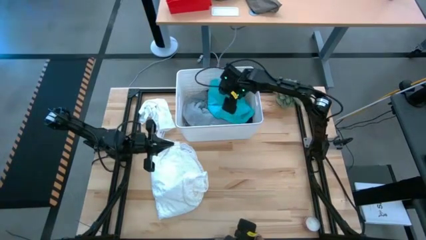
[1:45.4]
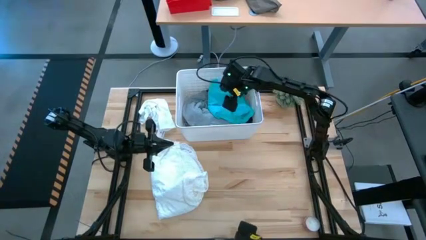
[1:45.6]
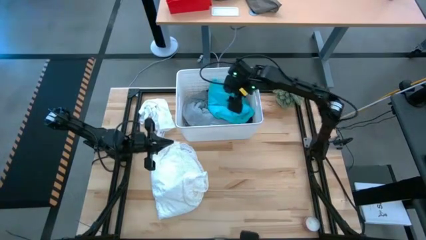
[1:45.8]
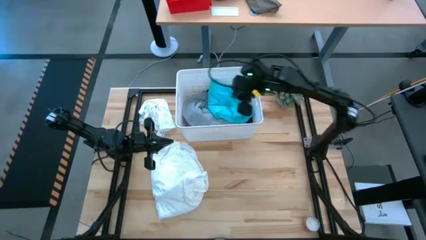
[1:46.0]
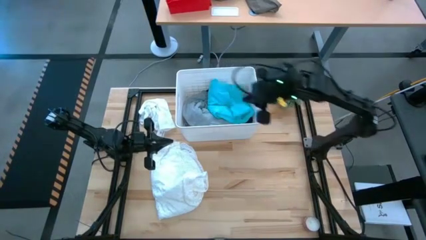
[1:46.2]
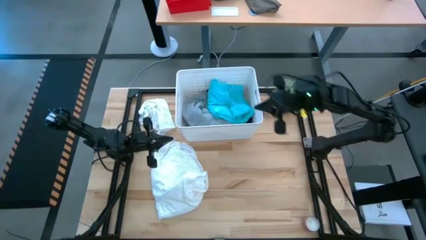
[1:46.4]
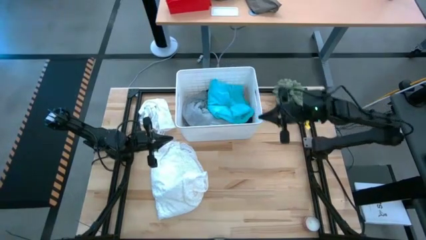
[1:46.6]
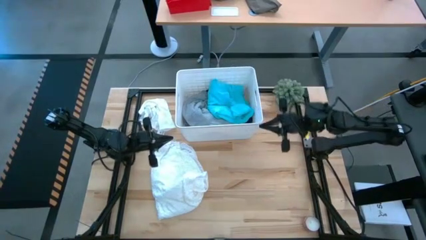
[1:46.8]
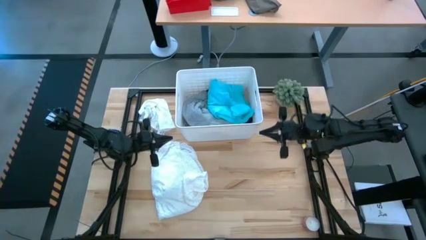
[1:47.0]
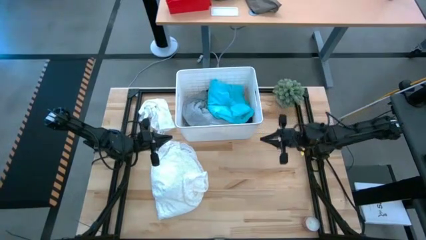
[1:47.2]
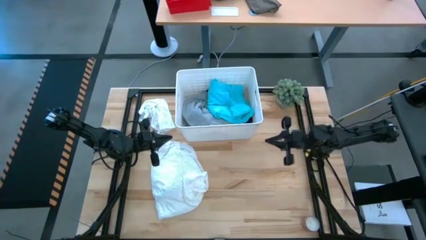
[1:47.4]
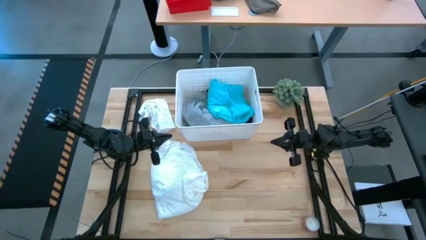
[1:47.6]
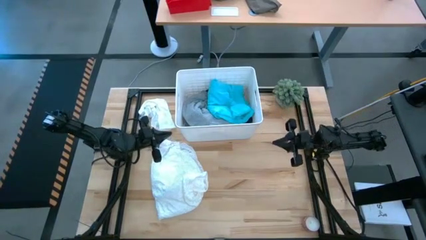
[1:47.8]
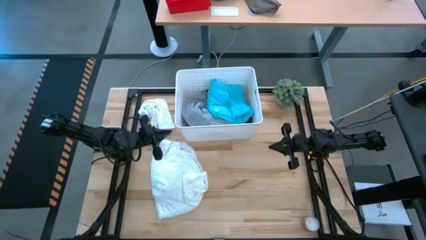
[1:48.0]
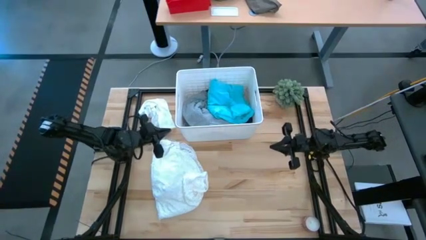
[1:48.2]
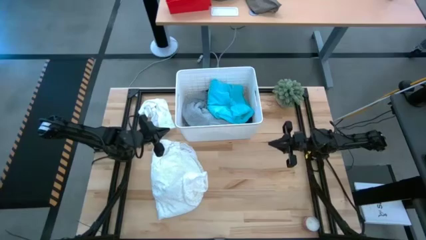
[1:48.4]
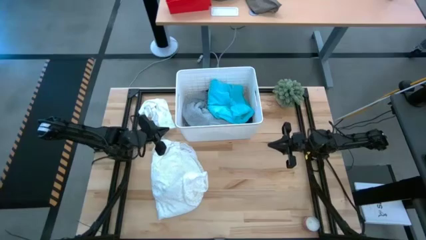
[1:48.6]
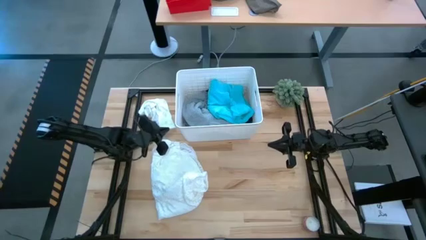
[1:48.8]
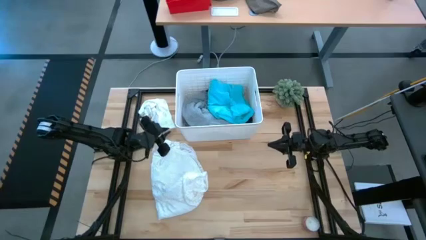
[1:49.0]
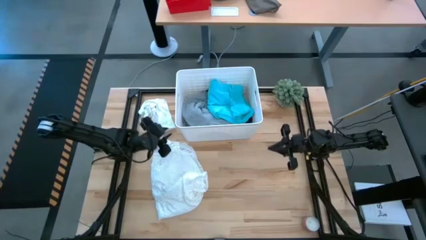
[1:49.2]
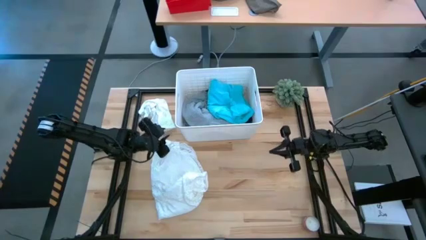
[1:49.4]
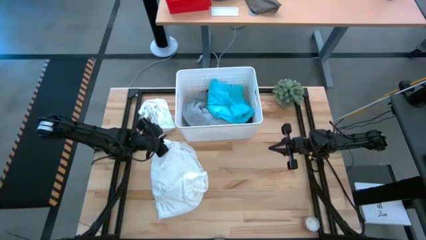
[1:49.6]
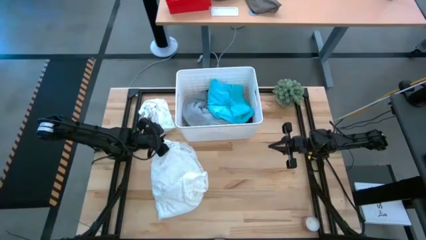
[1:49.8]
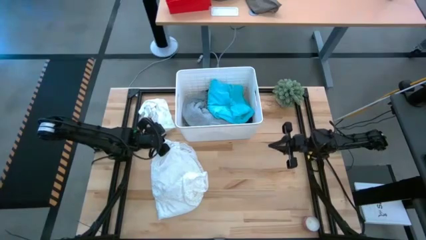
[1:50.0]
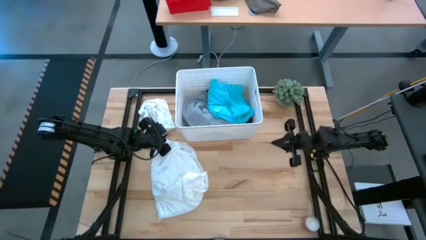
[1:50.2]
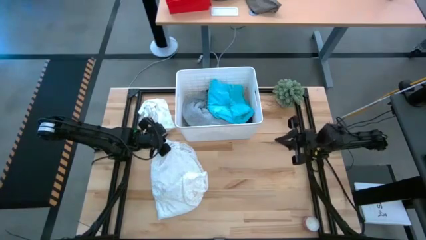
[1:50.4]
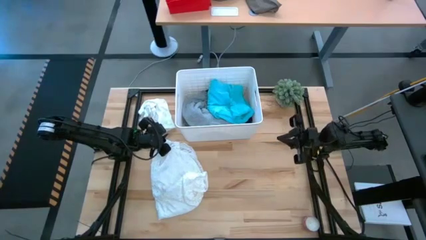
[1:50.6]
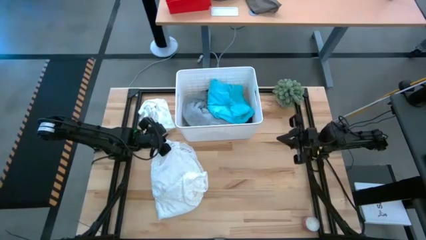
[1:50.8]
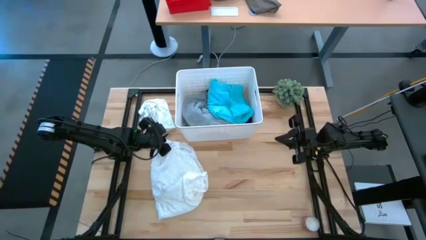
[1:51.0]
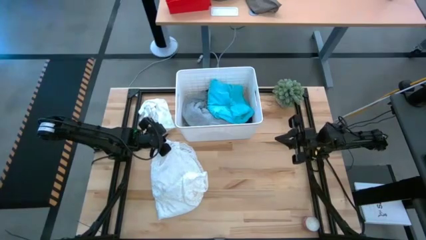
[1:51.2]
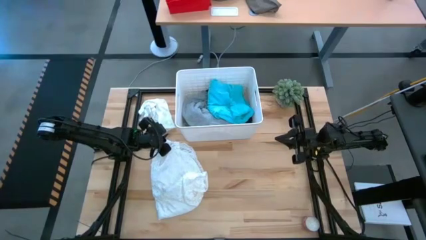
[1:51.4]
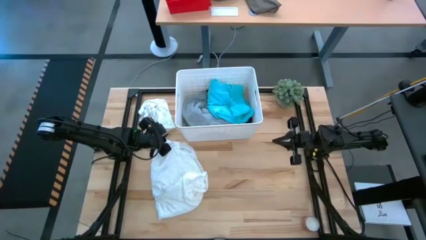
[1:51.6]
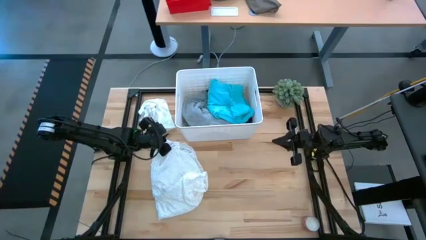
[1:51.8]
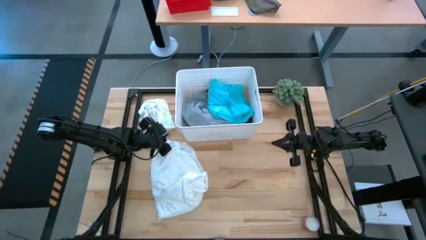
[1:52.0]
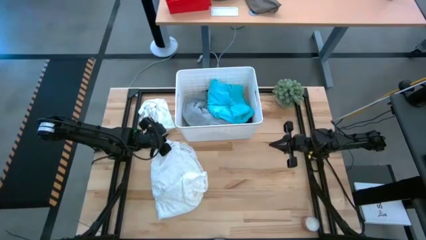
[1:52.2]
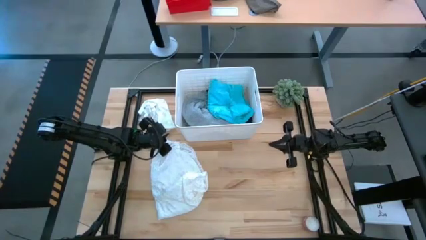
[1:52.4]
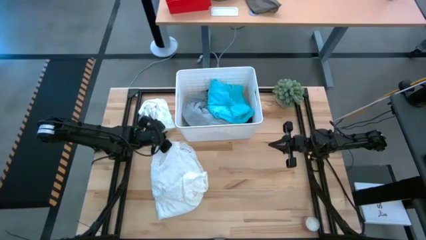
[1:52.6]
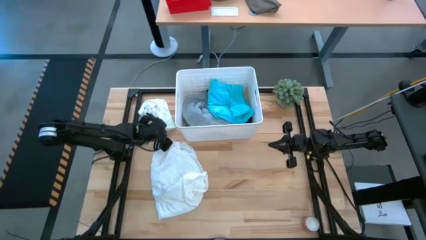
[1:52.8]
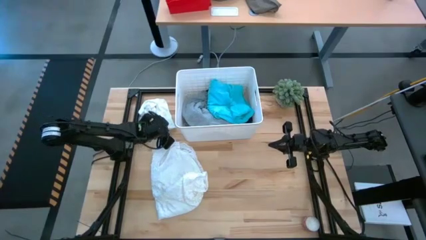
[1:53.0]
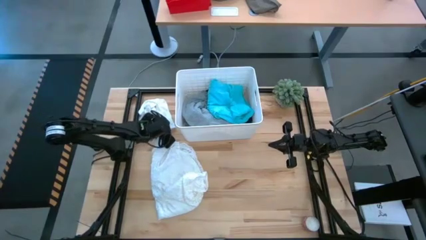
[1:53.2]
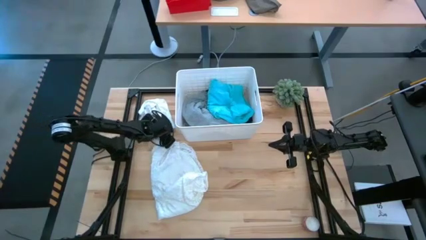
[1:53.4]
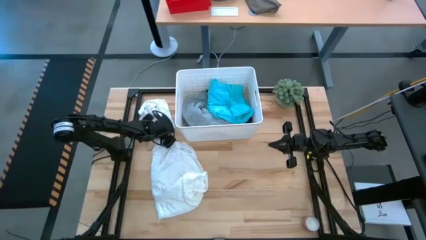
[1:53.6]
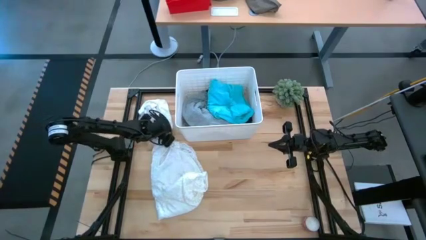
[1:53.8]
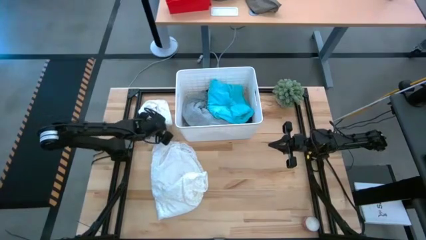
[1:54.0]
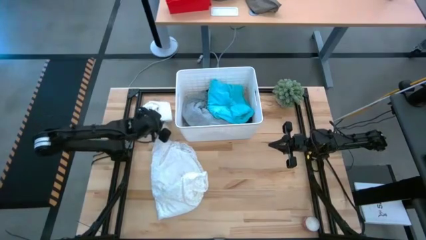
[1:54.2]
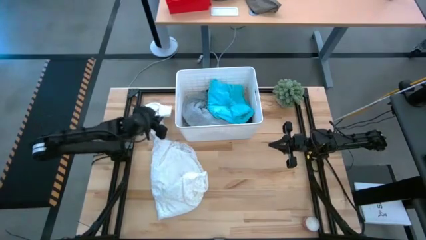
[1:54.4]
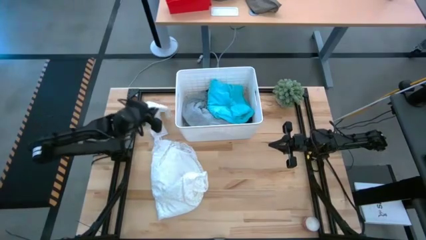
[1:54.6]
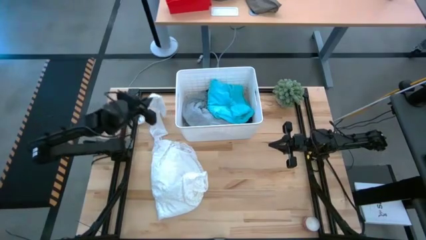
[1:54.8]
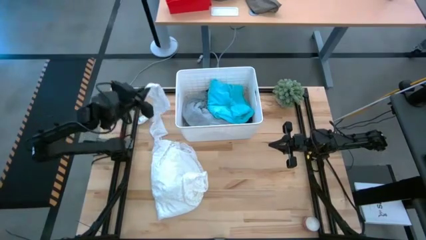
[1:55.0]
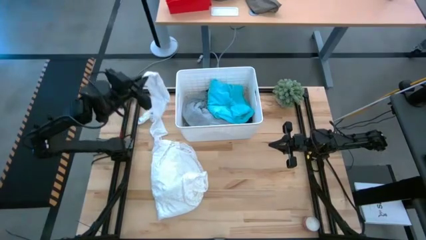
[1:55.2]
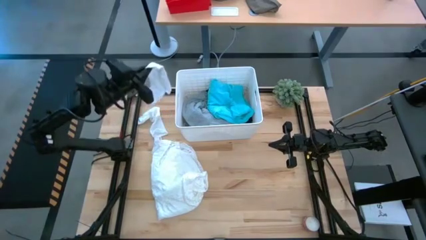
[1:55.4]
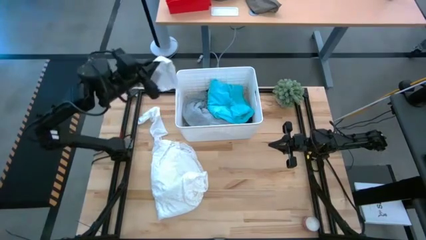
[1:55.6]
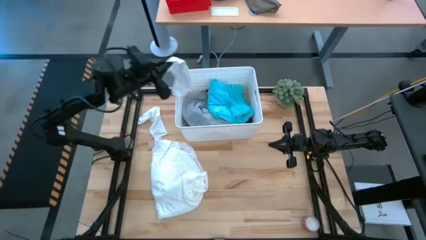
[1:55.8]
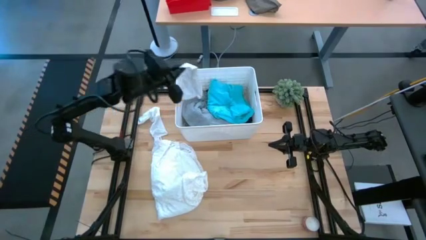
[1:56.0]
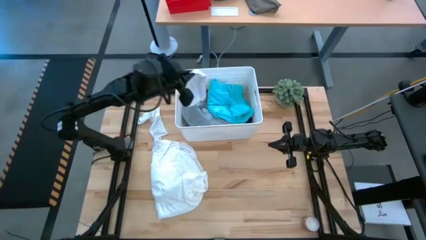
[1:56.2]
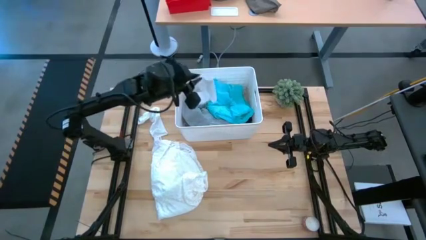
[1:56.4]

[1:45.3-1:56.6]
Task: Sort clothes
Put the white sock into the white laundry bin

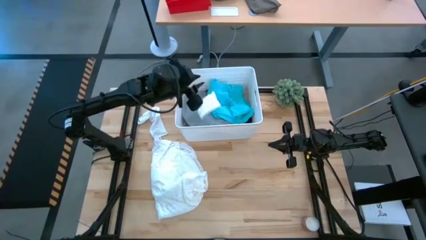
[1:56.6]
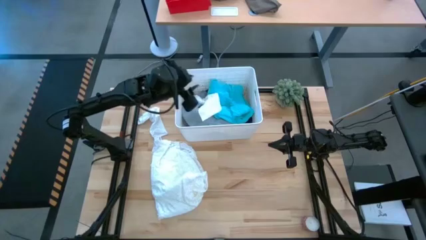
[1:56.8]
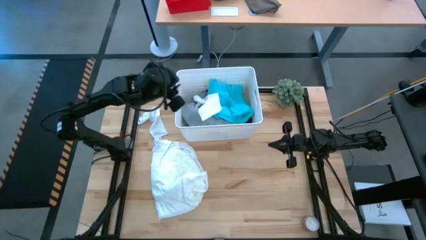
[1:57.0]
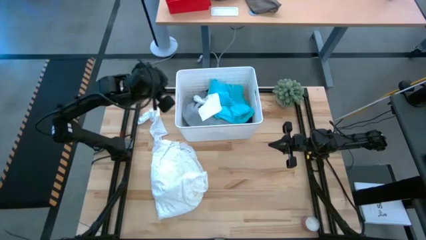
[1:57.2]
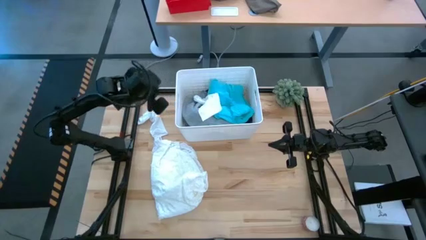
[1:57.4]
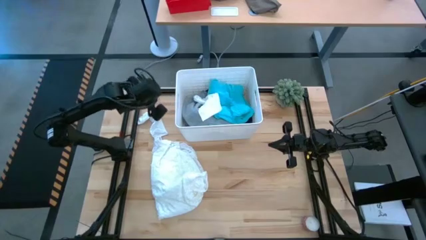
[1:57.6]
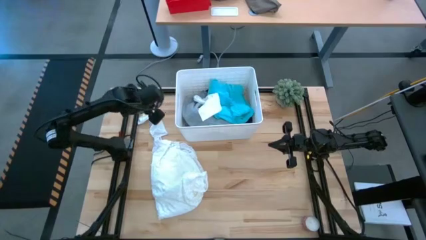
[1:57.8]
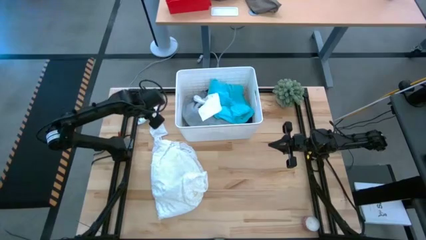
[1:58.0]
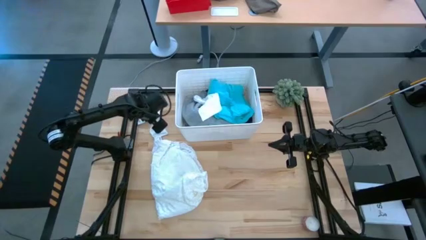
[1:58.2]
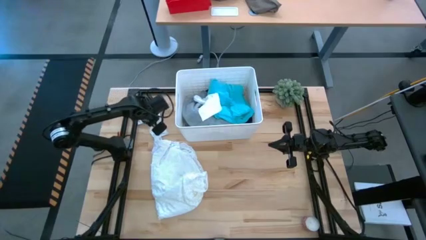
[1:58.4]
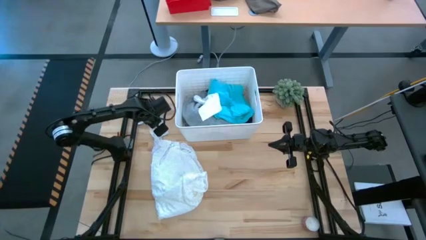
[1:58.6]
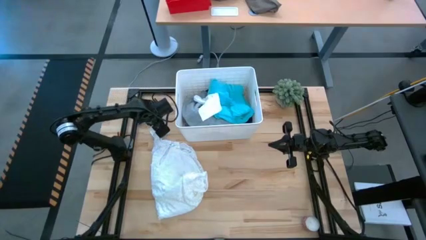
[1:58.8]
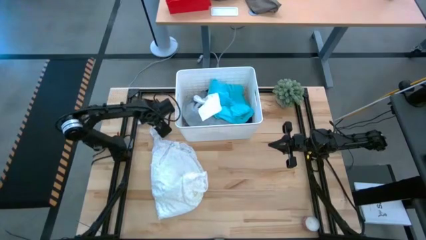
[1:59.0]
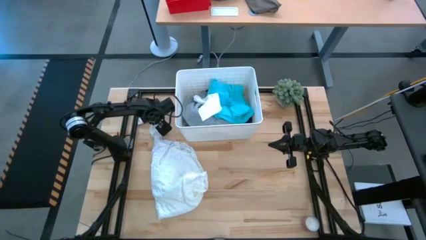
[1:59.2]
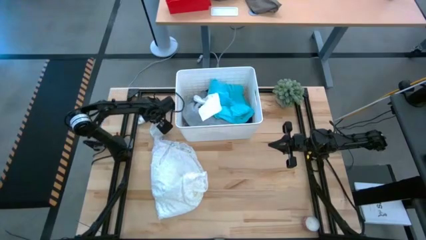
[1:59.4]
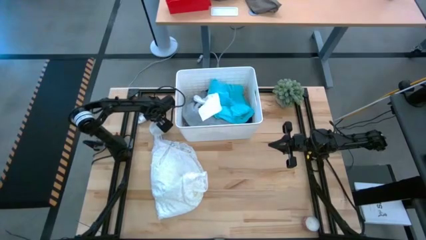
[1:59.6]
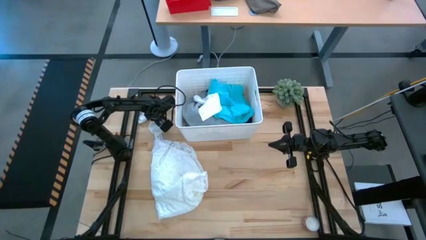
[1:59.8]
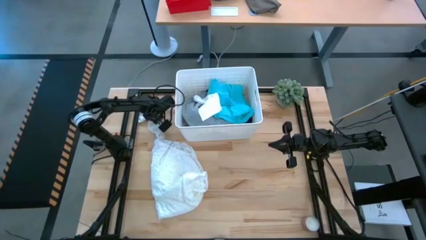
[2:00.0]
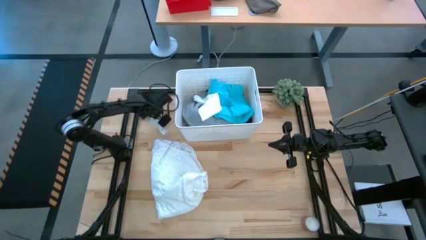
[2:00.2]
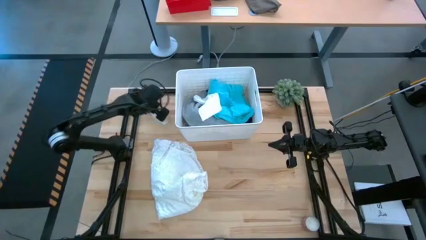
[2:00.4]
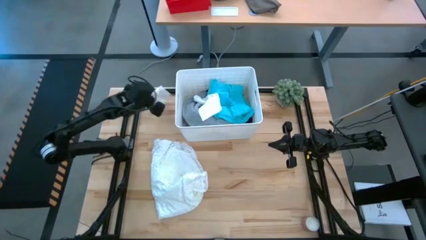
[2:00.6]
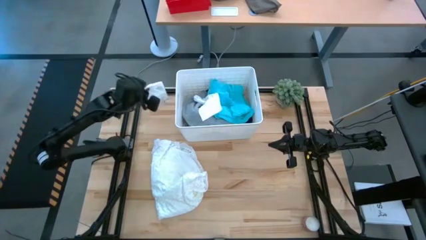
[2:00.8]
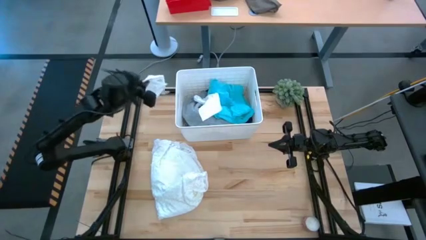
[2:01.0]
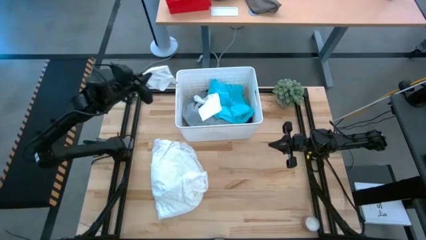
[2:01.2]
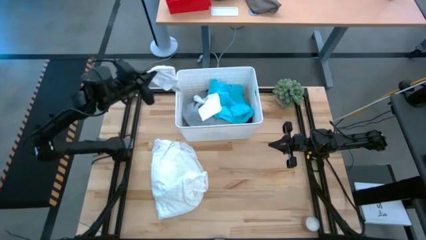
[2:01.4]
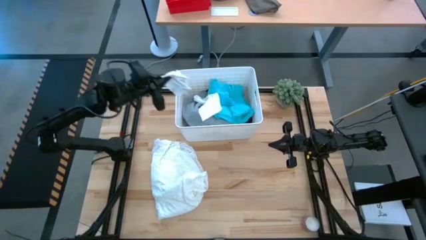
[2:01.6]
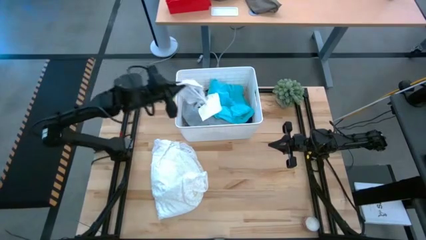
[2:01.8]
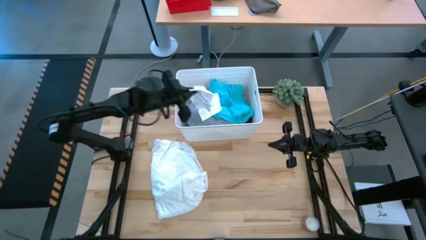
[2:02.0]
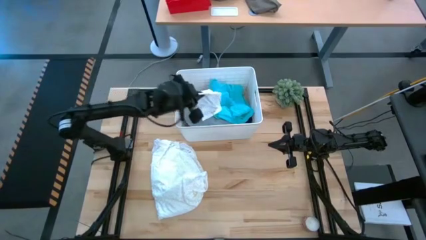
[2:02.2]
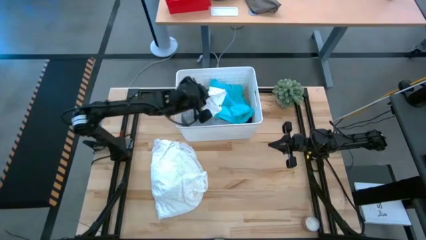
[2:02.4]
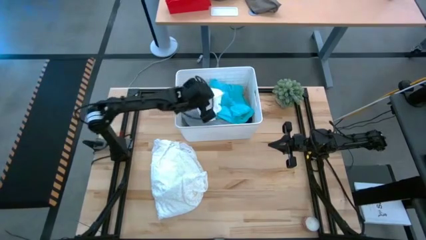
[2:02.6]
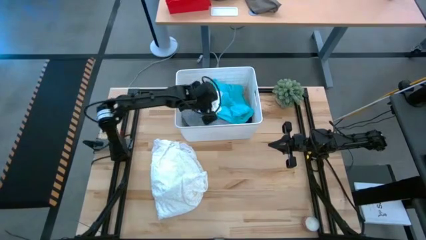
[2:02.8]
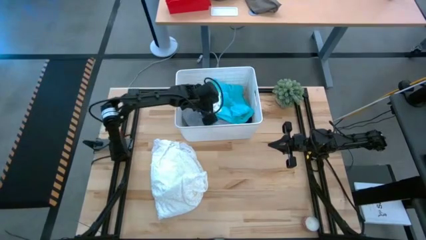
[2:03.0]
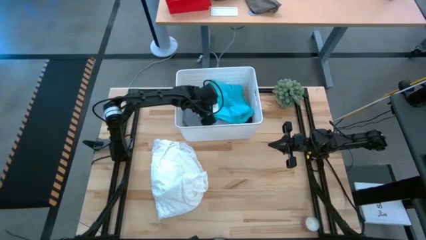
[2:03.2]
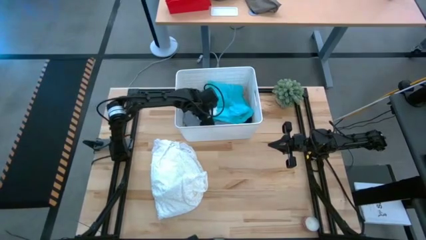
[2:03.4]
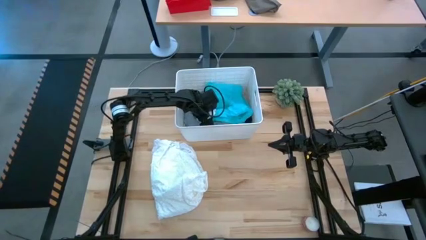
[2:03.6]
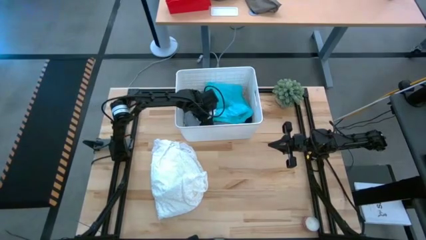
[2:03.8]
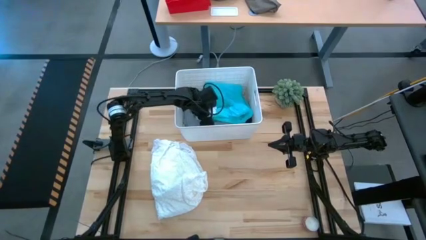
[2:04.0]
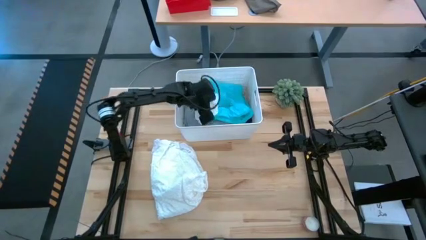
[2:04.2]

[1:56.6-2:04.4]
Put the white sock into the white laundry bin
